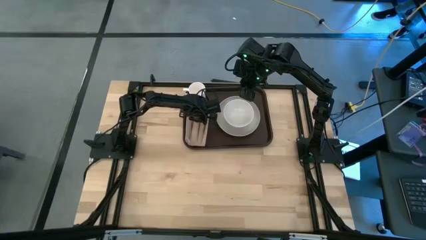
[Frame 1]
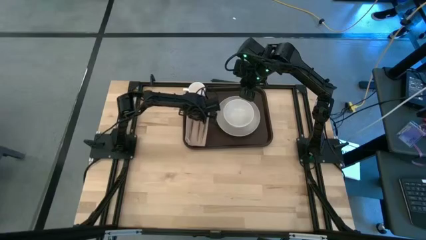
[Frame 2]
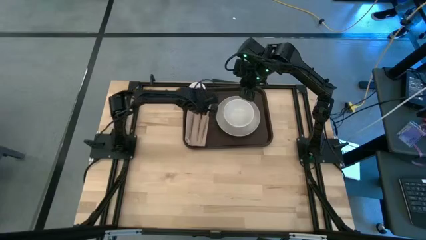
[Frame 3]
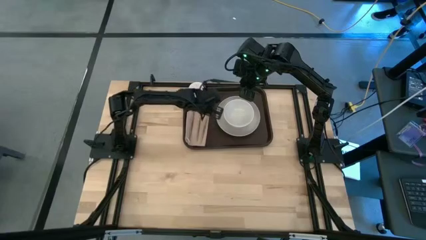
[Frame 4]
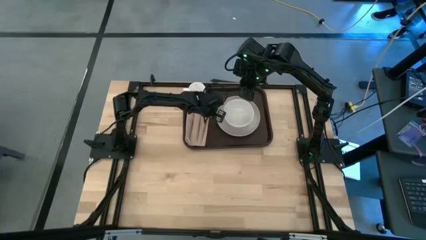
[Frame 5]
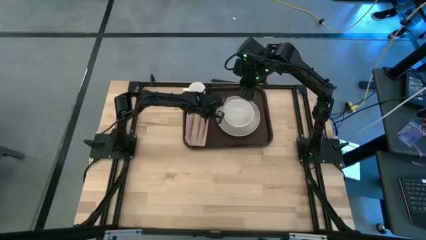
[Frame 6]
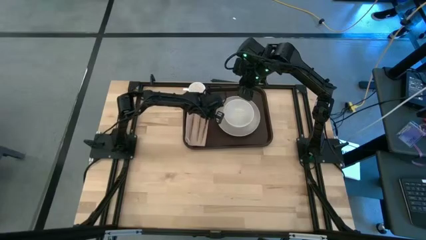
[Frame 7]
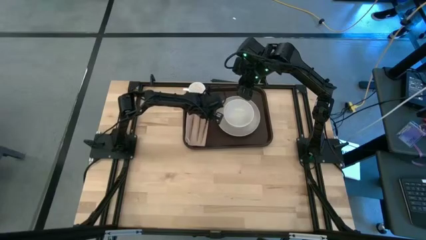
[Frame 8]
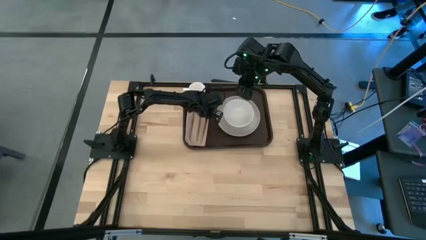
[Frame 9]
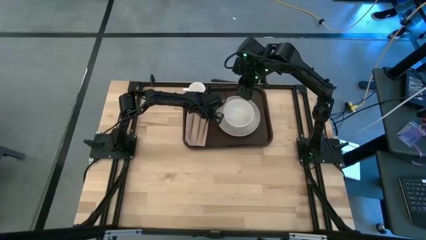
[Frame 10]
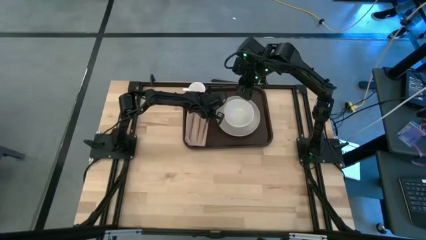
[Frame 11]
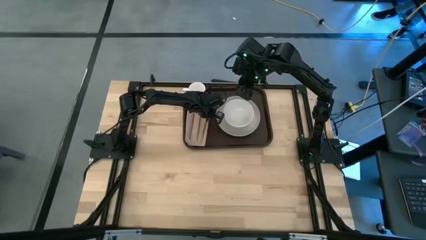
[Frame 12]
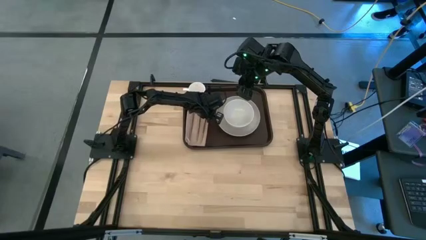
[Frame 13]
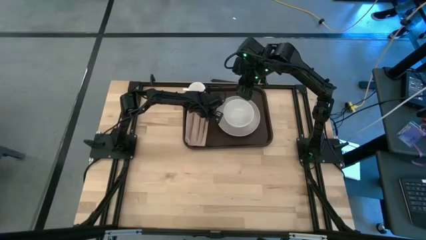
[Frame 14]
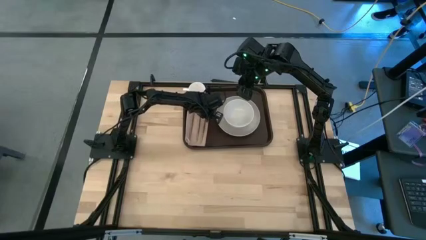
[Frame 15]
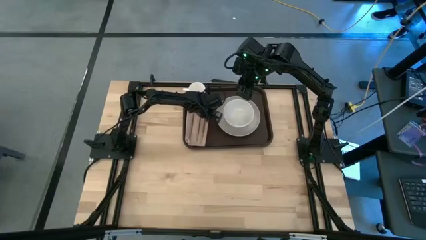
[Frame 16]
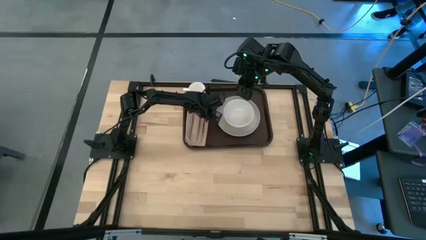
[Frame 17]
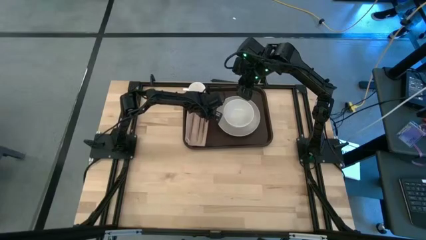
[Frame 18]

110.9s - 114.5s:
Task: Set up tray
Adjust the gold knife on the light brown napkin

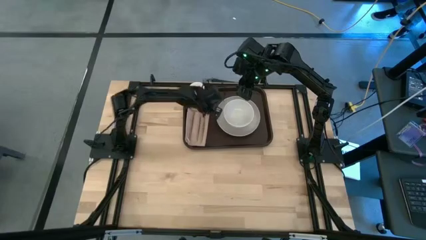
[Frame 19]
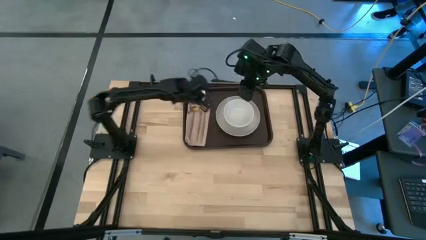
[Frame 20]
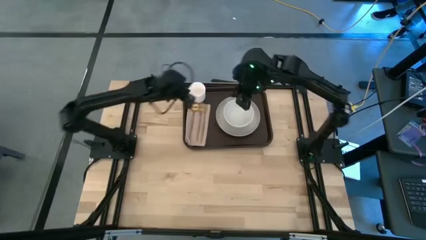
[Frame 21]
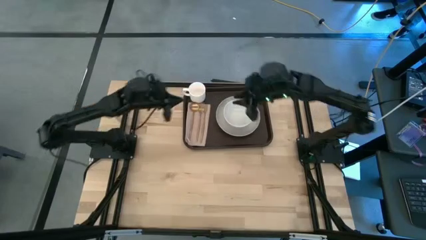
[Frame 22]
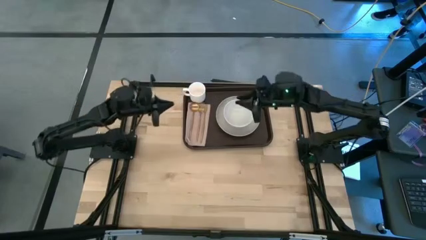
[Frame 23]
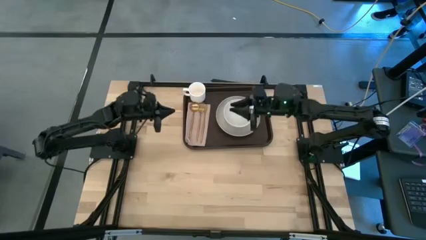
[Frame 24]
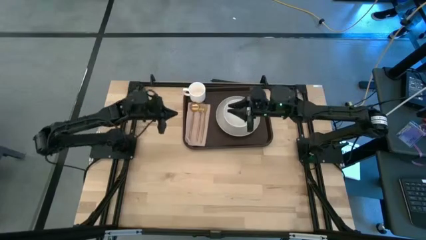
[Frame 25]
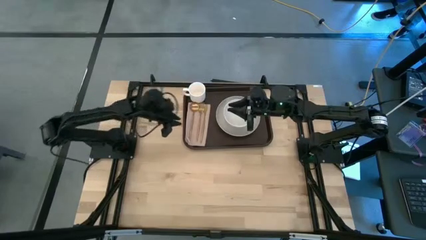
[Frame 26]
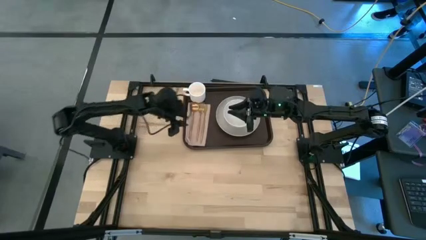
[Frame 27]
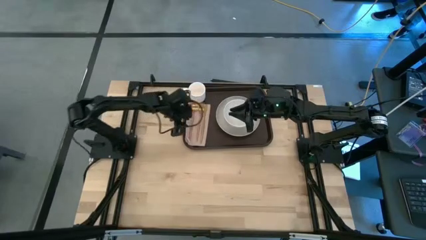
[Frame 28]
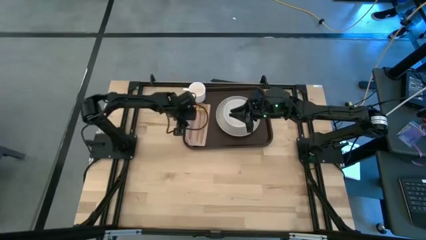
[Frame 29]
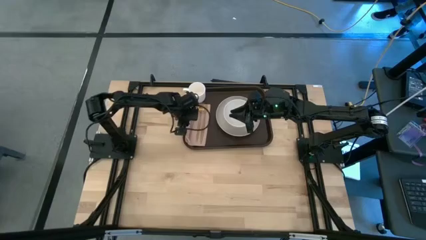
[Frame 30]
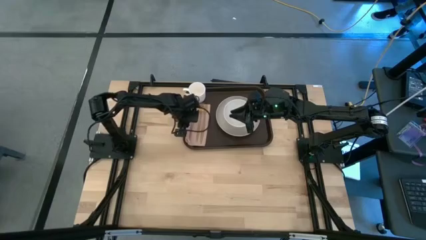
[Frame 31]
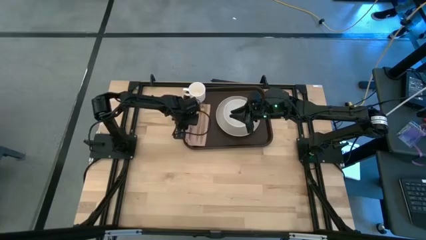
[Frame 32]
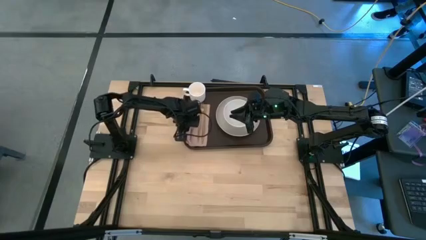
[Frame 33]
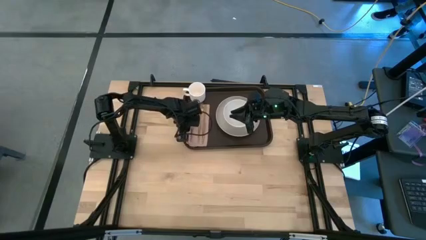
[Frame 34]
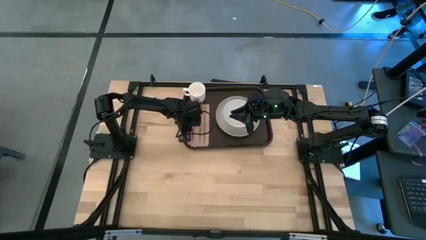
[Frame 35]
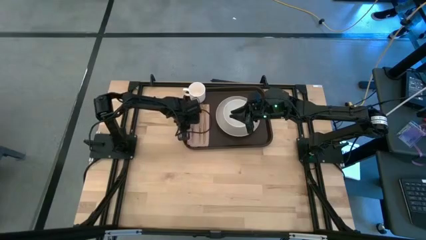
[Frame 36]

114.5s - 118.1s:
Adjust the light brown napkin

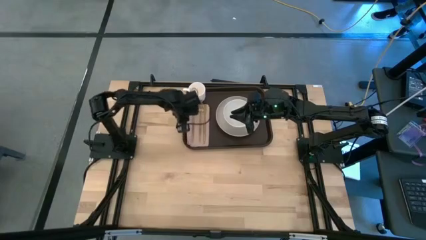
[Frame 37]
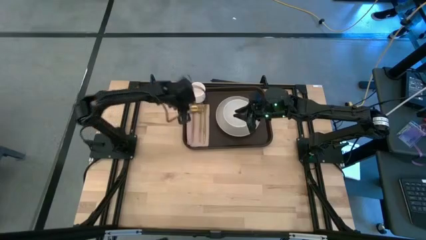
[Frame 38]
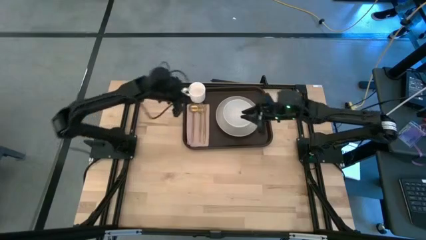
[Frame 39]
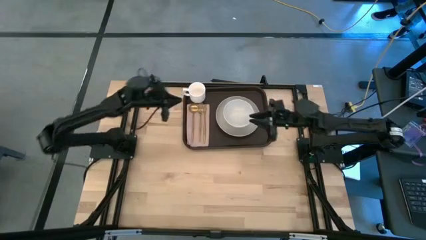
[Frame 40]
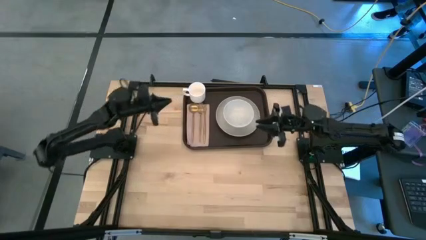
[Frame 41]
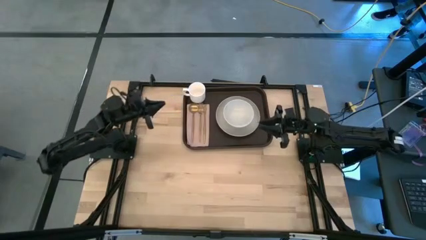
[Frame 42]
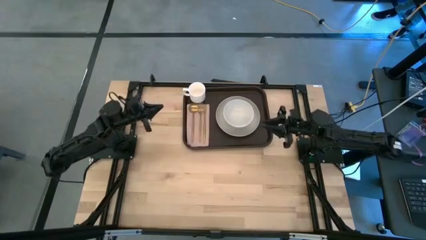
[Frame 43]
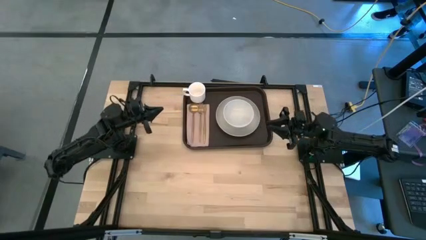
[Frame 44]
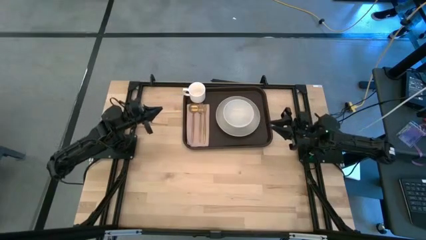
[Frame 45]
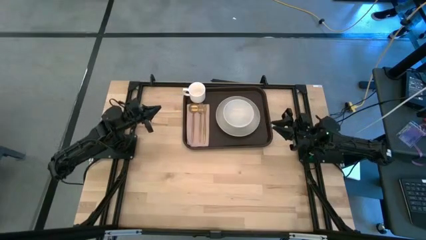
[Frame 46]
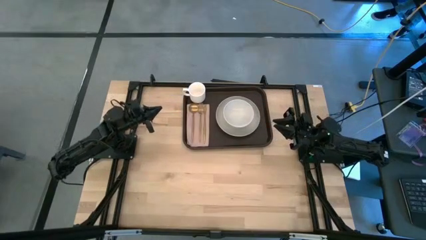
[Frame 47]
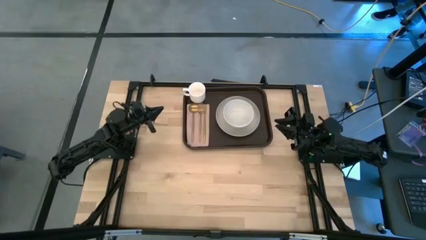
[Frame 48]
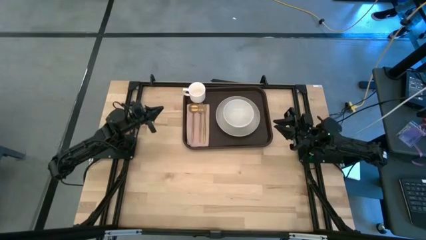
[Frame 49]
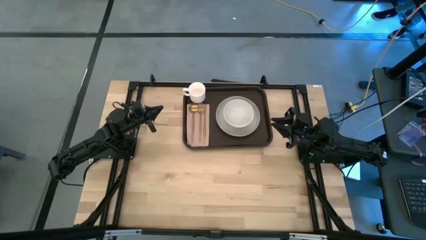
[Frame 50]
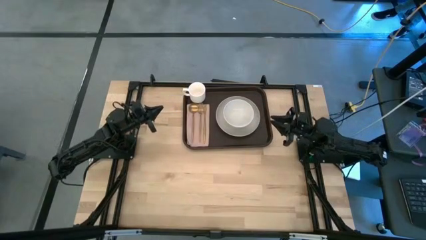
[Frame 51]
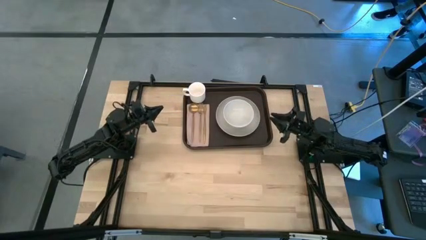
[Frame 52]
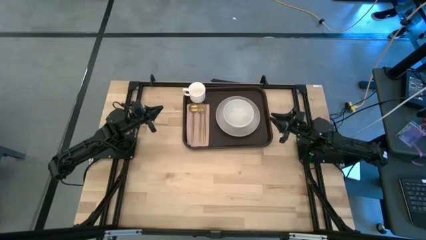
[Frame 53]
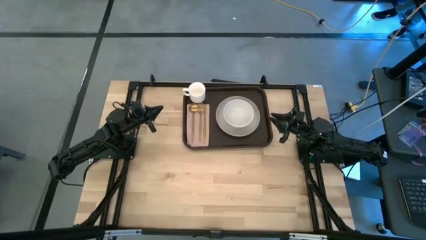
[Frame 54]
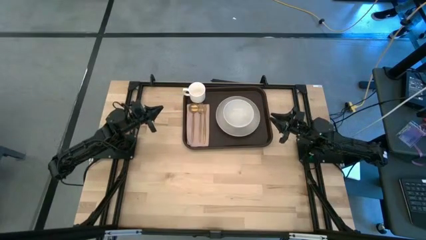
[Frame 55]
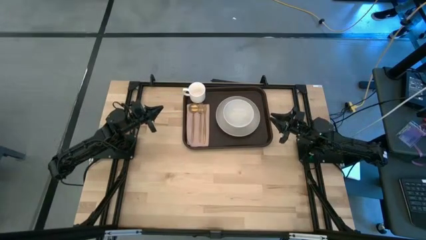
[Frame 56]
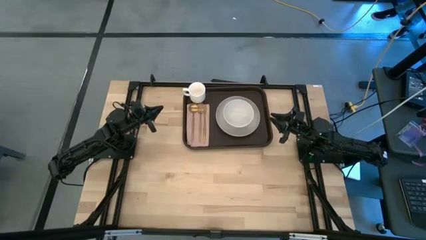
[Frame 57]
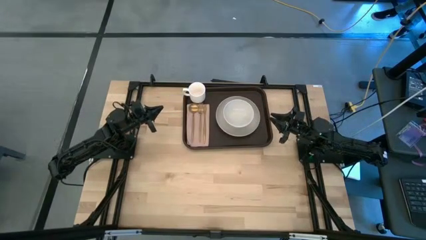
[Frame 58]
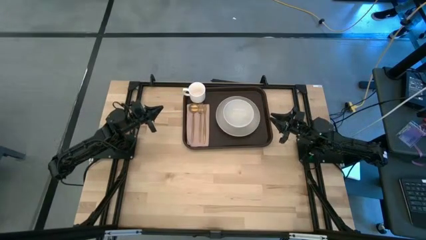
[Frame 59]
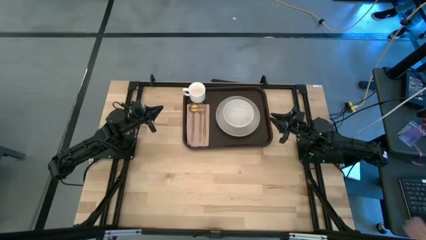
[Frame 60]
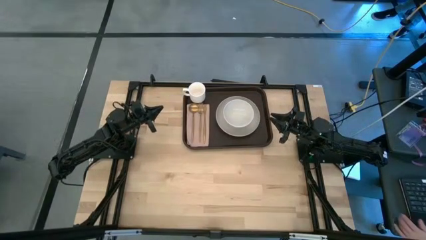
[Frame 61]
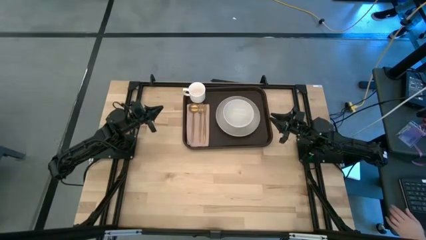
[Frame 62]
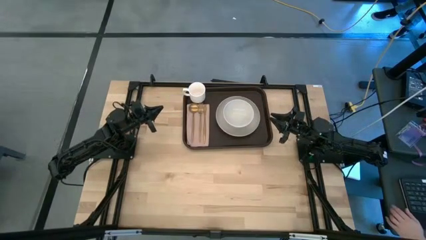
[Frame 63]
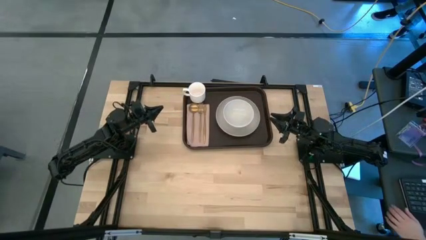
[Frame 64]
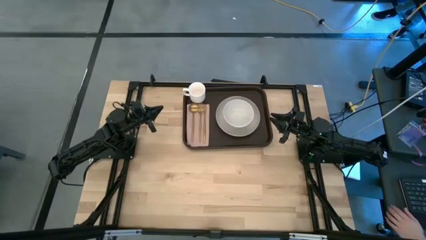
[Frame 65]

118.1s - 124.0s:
Return to Home Position

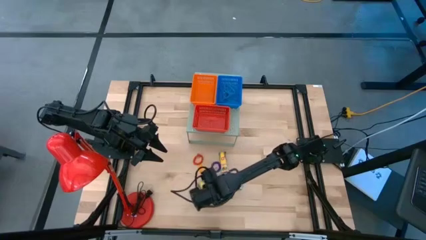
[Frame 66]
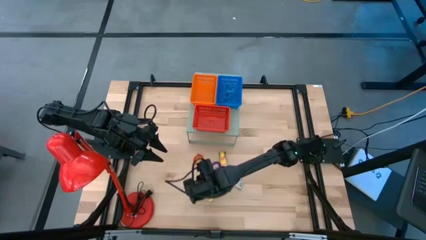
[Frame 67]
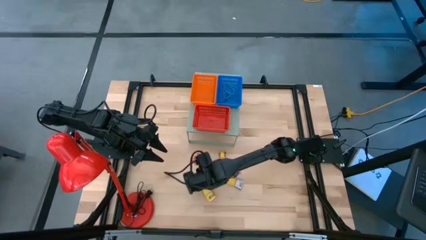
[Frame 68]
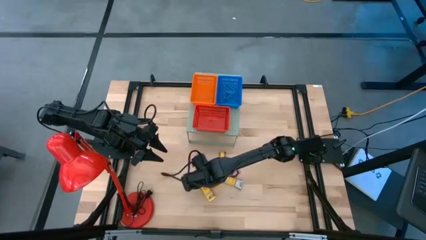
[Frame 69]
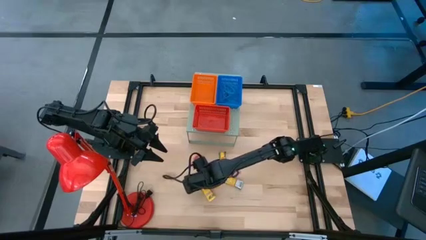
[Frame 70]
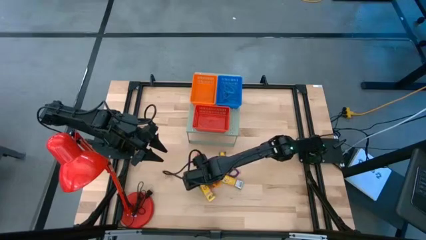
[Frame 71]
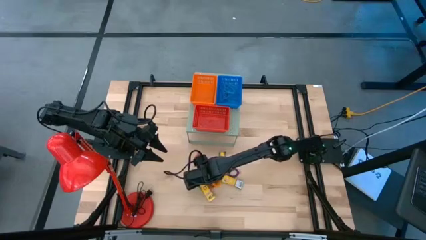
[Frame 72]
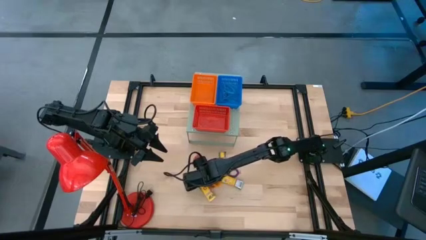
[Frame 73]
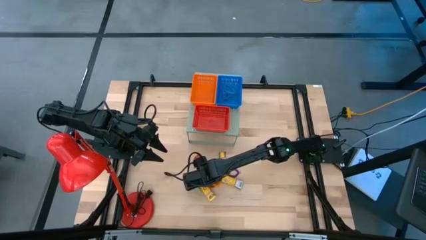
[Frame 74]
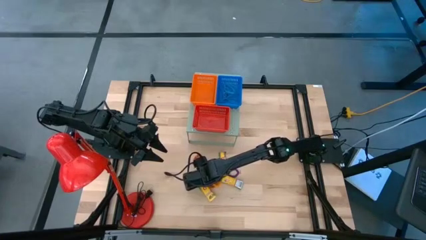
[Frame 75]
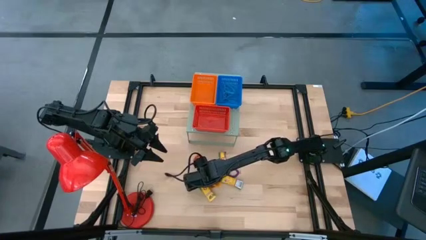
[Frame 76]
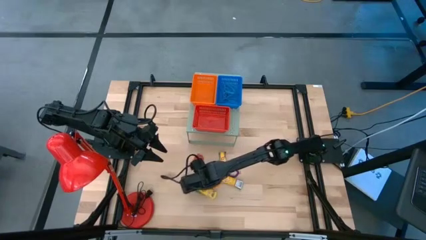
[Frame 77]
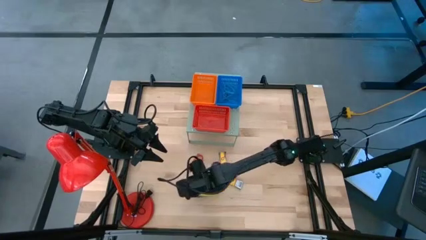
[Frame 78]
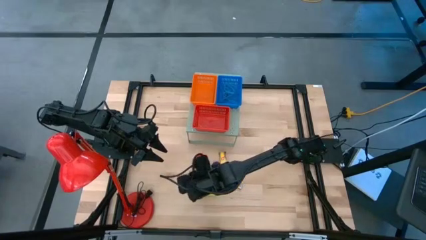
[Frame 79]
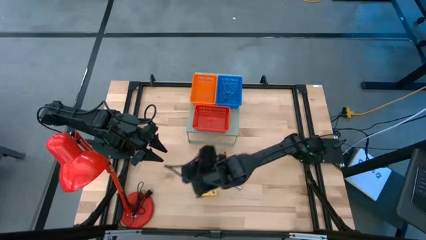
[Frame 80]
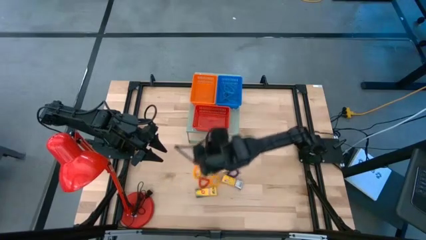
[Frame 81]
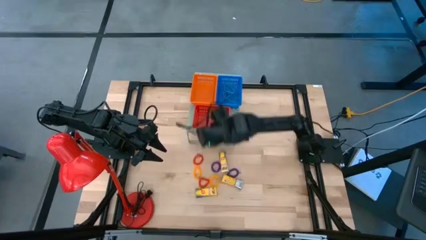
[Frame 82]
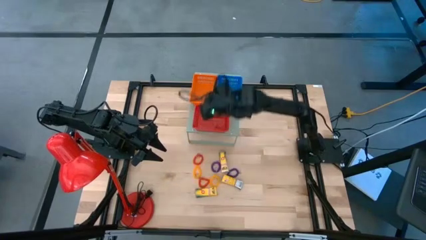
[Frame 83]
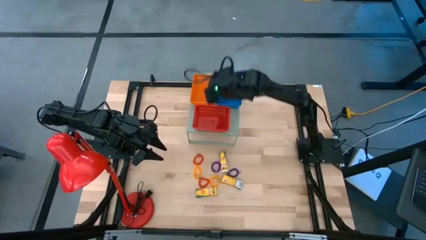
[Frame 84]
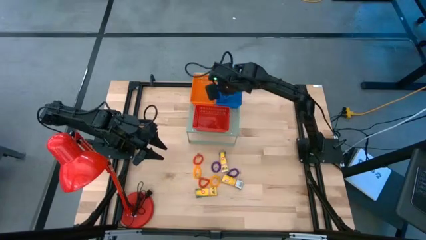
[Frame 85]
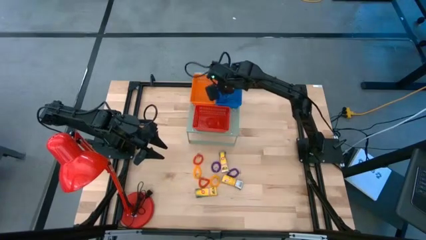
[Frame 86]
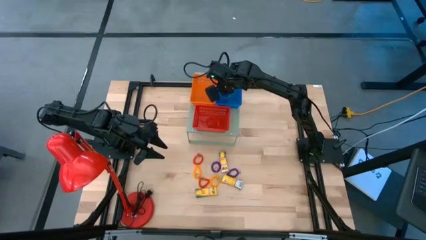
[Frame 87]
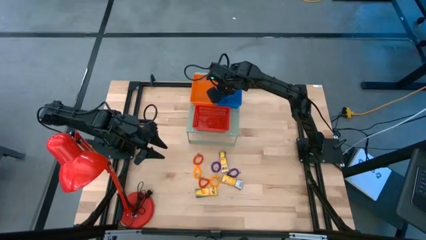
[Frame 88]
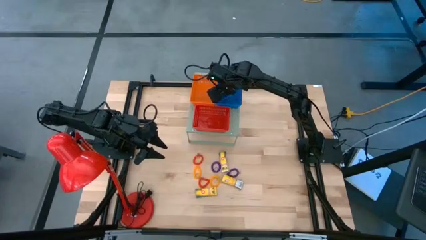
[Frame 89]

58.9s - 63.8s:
Task: Pick & Place Office Desk Supplies
Put the blue rubber band into the blue bin
